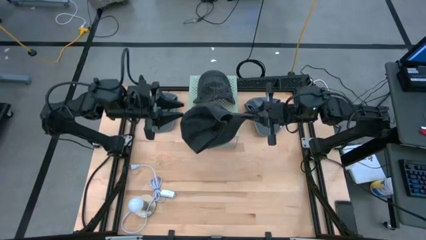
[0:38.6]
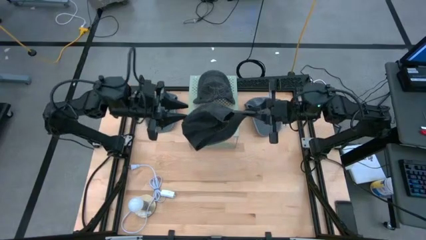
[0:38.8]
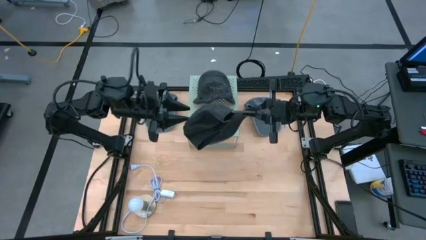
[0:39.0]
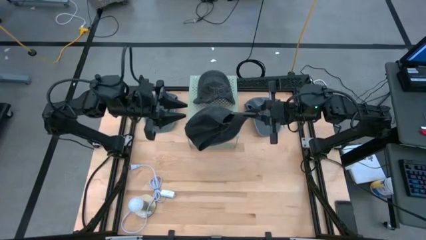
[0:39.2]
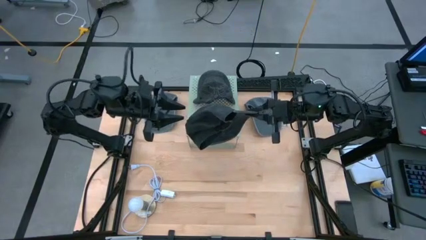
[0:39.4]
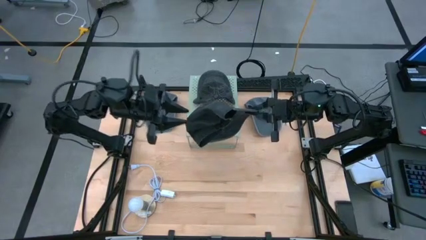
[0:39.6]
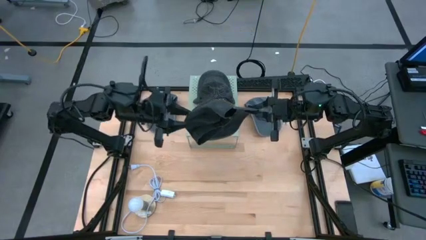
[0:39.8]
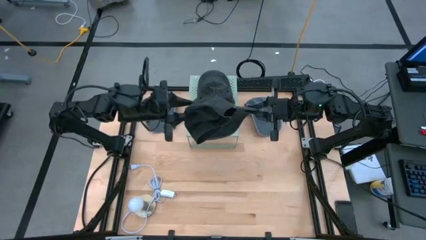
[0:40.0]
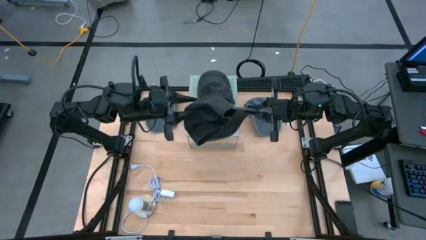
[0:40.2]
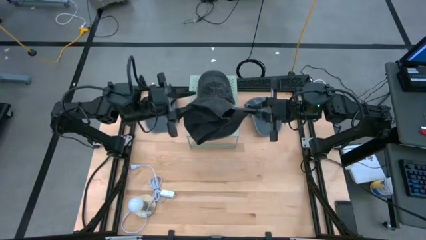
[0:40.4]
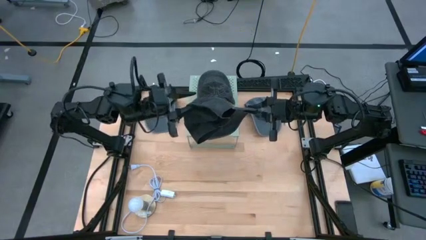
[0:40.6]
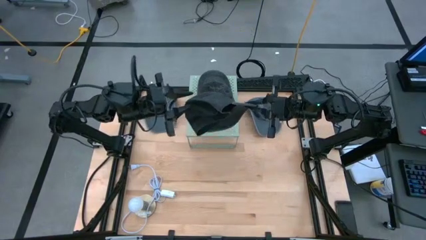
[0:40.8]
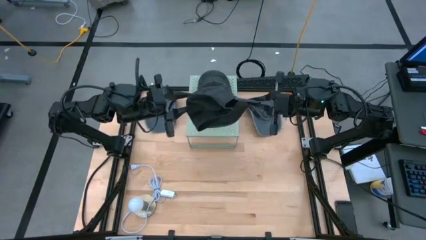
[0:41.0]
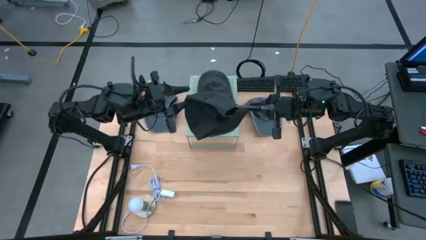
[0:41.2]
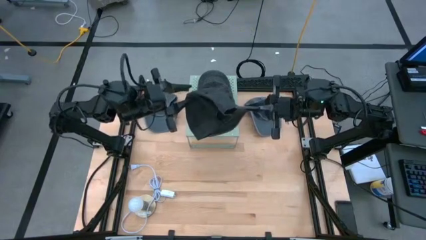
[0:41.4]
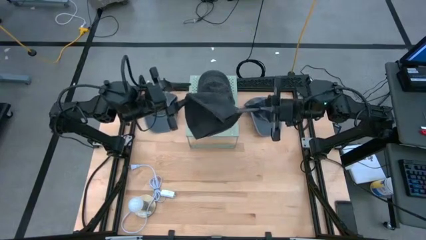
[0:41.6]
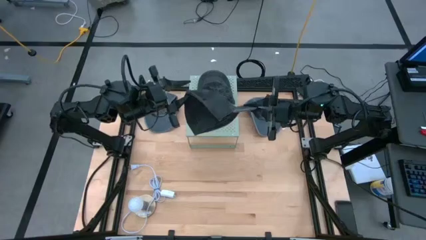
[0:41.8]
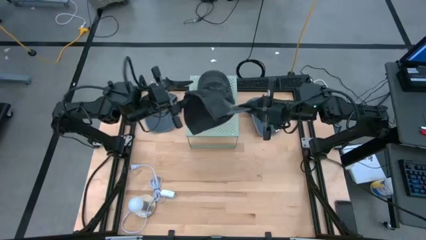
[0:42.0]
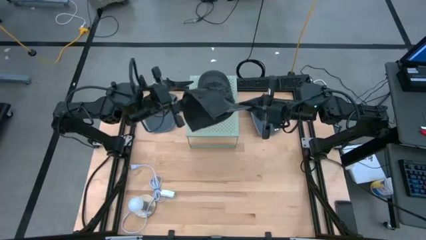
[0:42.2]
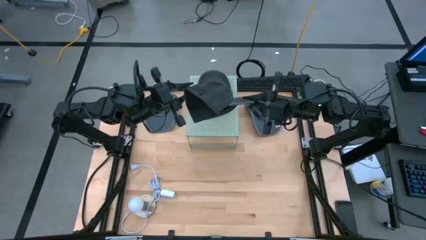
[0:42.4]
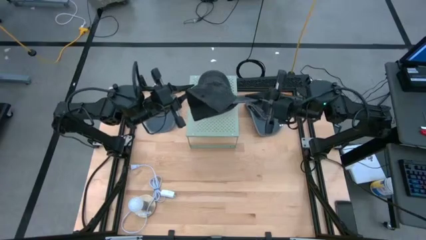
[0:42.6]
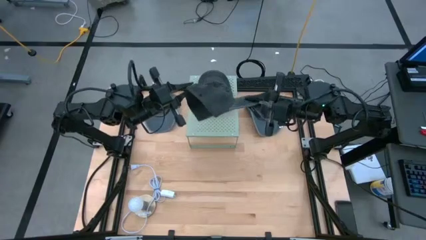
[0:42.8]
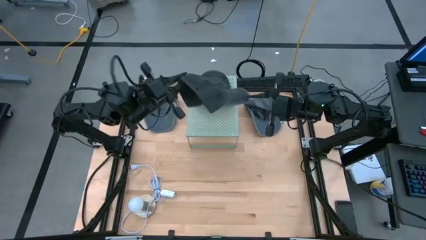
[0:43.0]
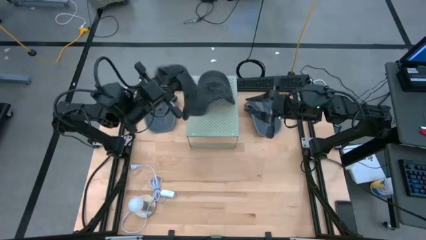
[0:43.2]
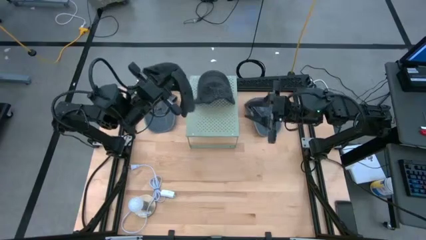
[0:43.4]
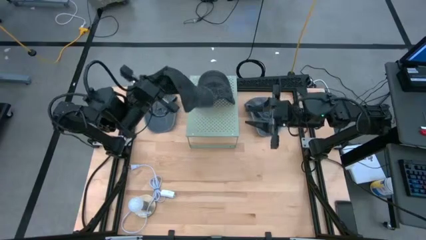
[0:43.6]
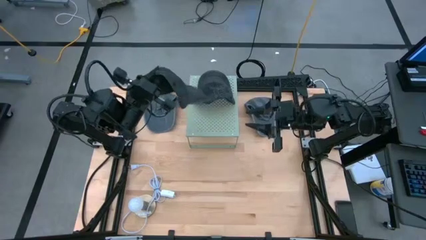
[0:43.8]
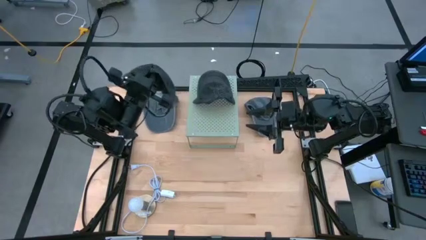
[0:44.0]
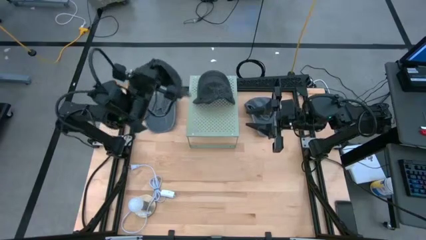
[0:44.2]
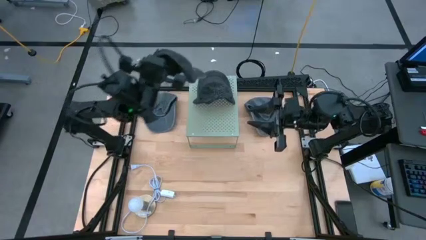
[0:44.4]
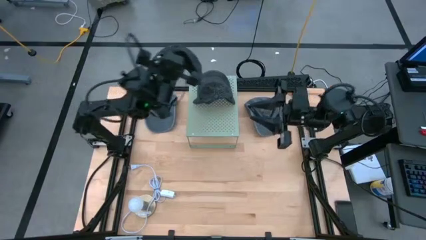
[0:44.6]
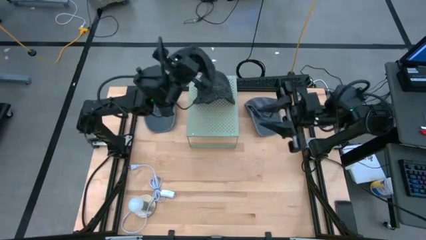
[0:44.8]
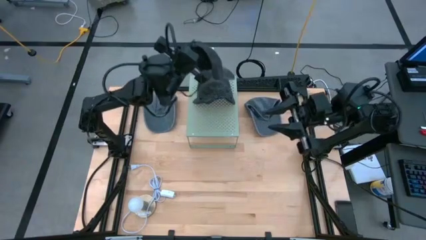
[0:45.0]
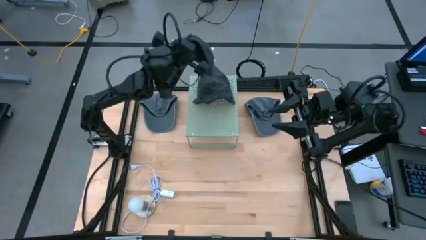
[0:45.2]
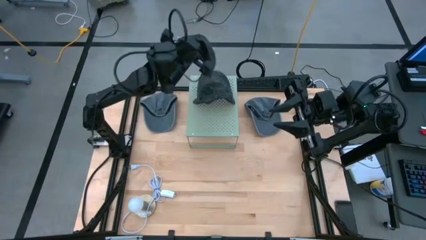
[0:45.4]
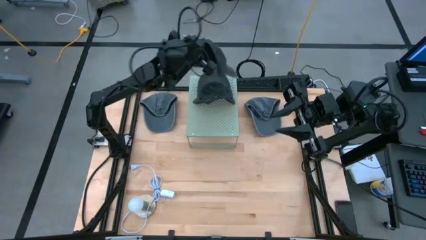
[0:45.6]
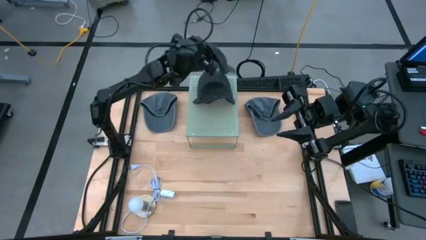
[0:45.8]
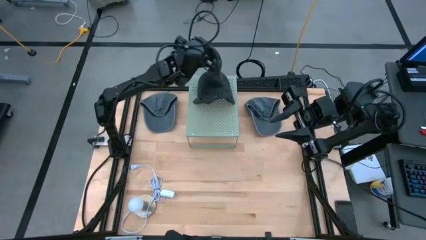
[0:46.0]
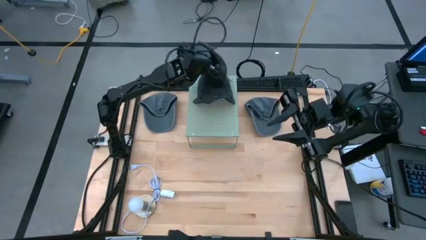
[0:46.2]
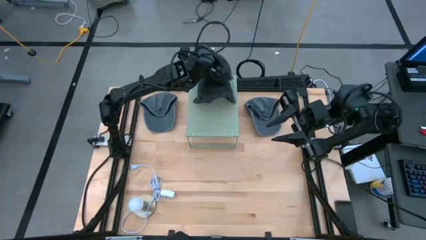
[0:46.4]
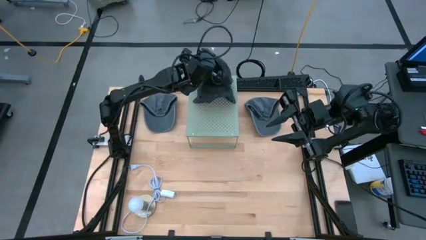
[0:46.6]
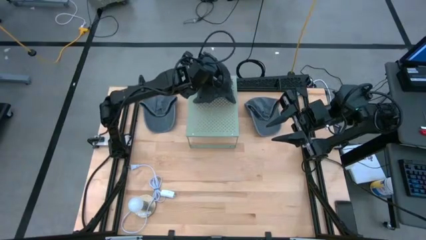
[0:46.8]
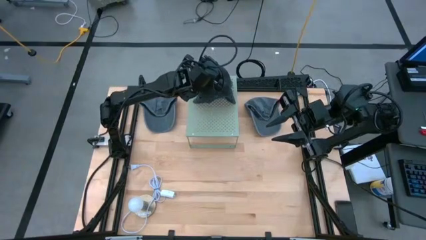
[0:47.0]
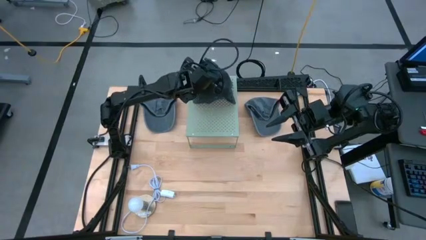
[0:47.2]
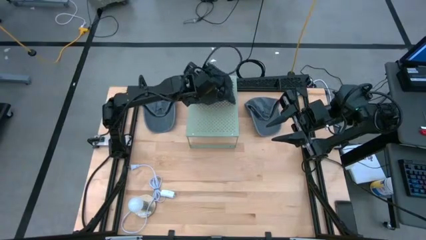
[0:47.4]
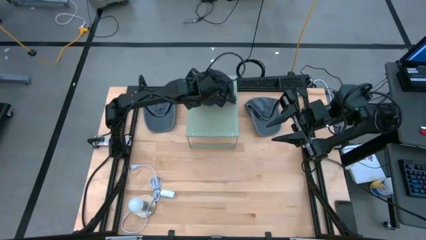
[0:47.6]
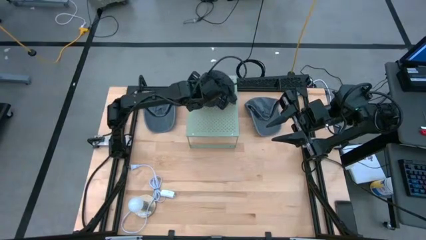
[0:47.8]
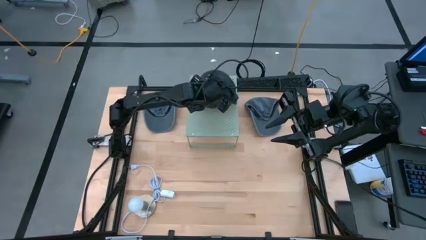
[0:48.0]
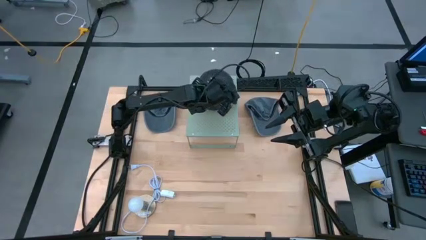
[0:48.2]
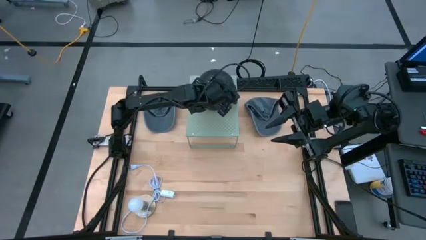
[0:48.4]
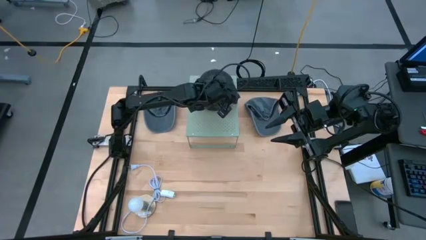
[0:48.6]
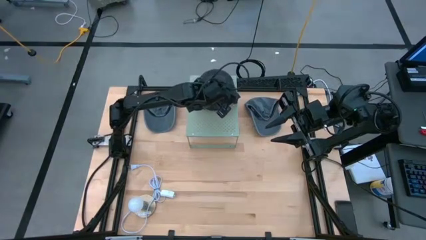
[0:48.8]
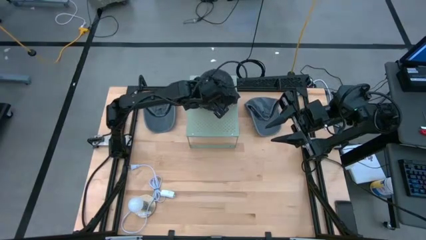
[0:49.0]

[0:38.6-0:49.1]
Task: Pick & Place hat
Stack the black cap on top of the black cap on the shelf
